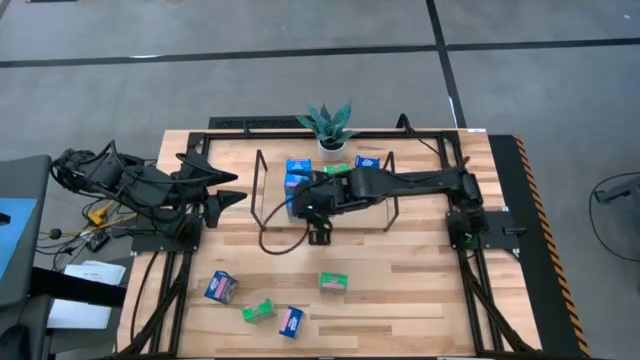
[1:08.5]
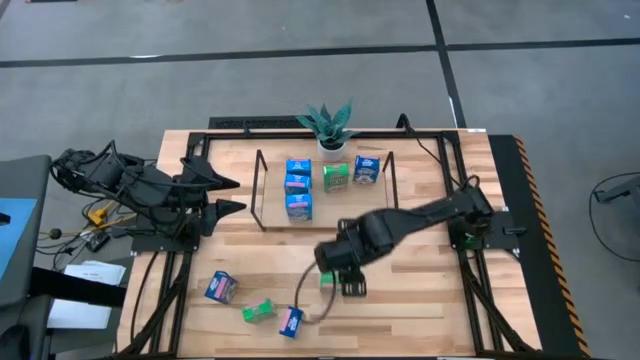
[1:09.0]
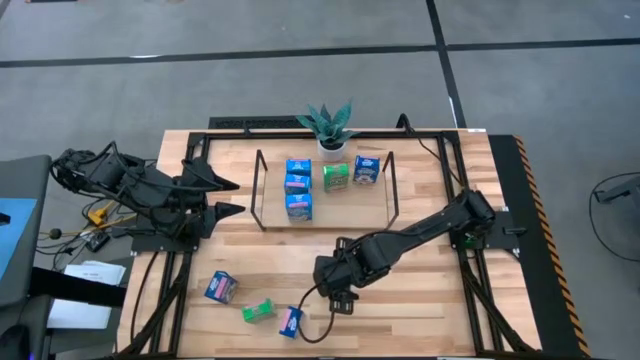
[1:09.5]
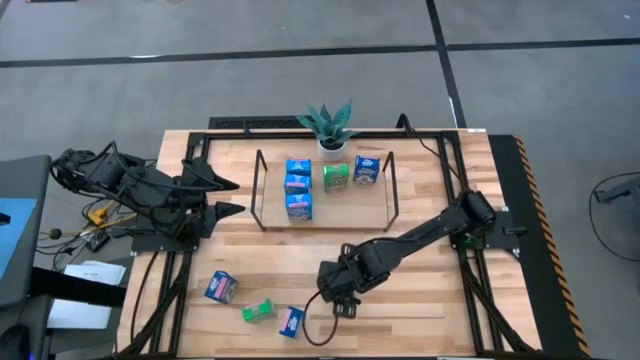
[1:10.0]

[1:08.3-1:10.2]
Task: Stack cereal on shelf
Put the right green cereal box on the shelf aligned with the other green cereal box

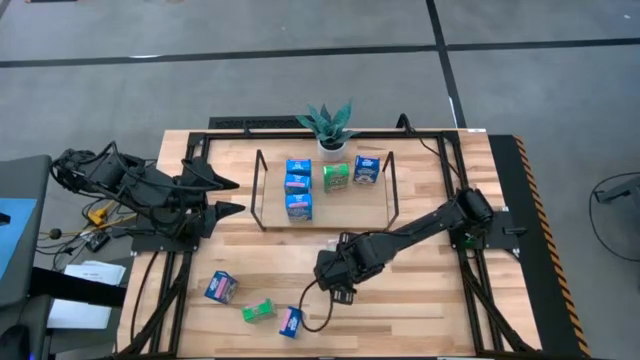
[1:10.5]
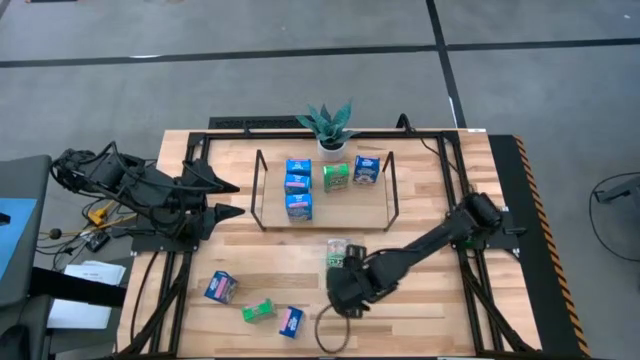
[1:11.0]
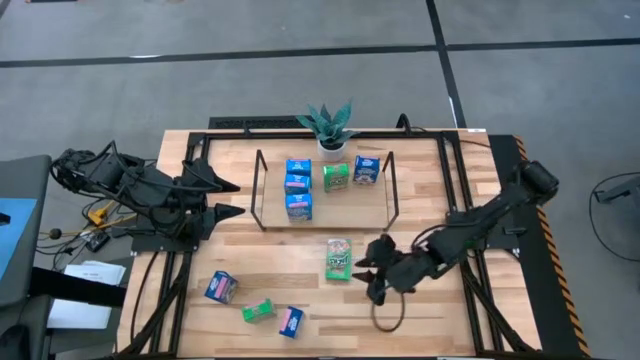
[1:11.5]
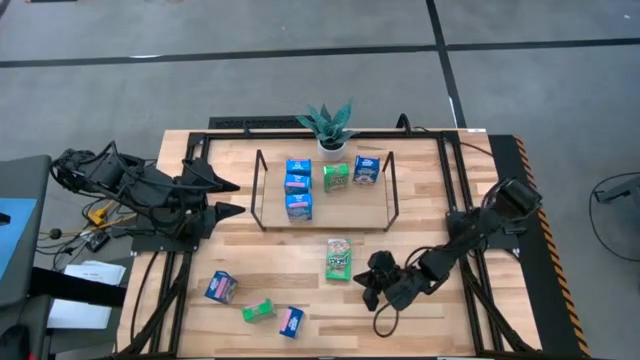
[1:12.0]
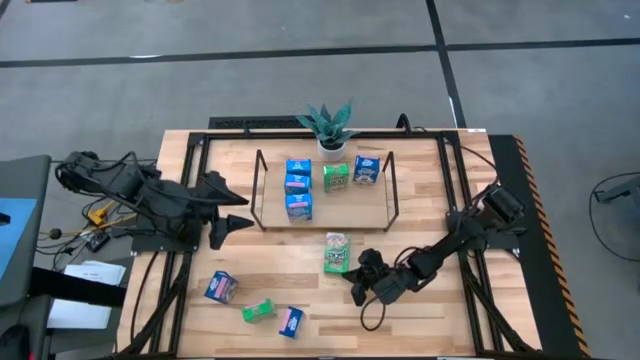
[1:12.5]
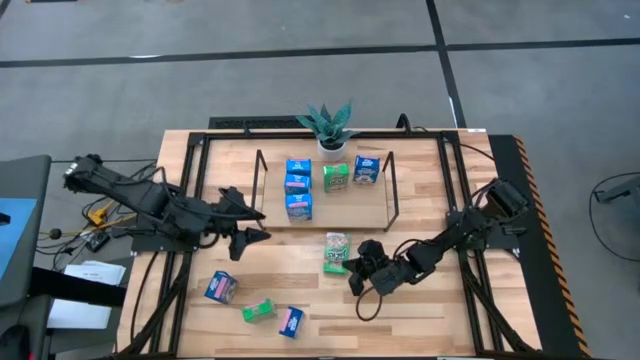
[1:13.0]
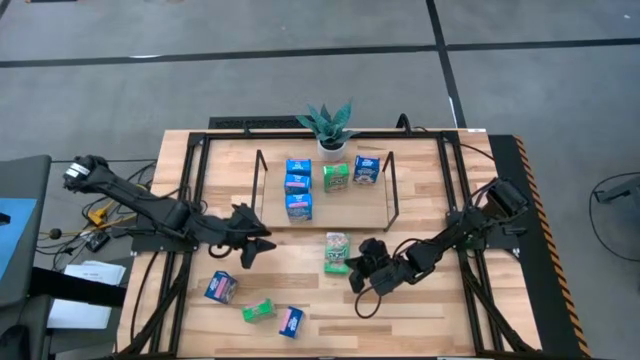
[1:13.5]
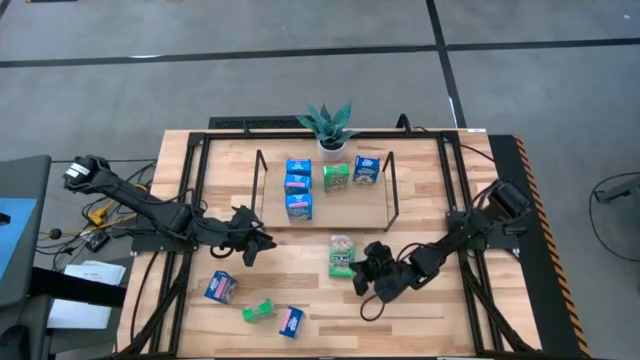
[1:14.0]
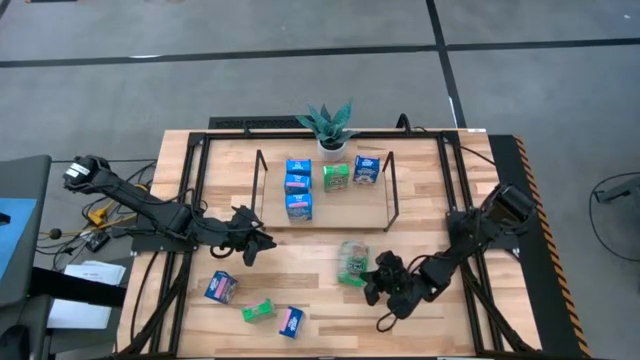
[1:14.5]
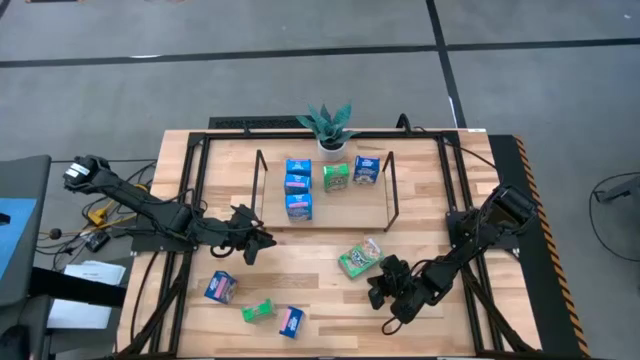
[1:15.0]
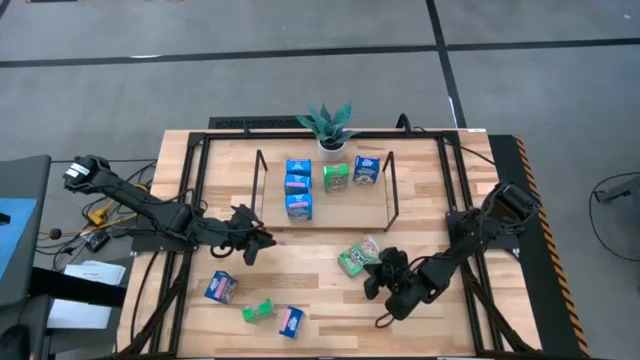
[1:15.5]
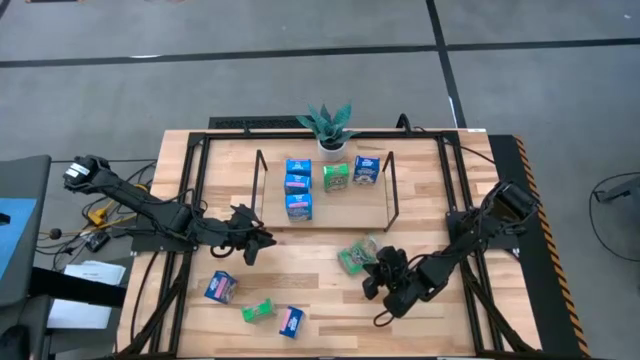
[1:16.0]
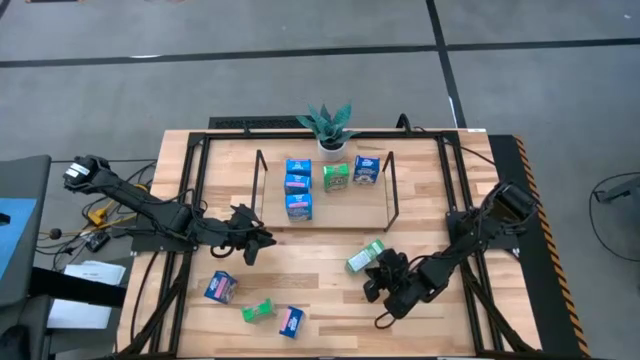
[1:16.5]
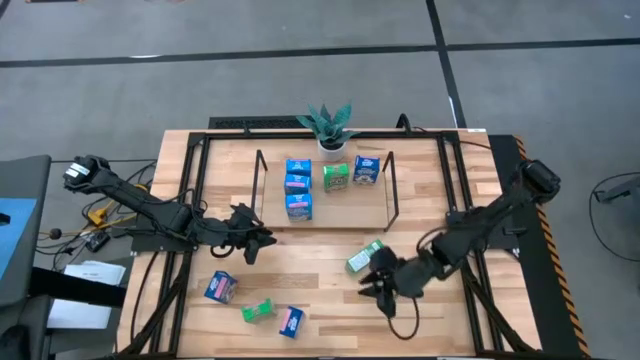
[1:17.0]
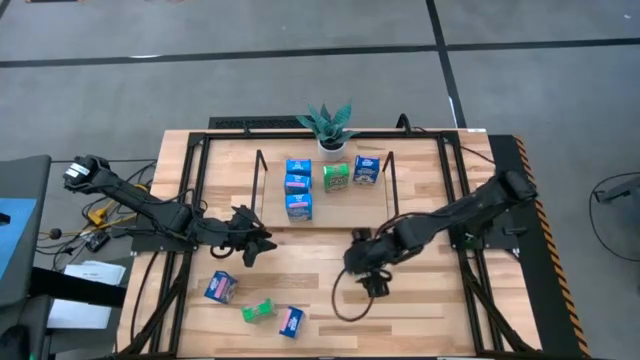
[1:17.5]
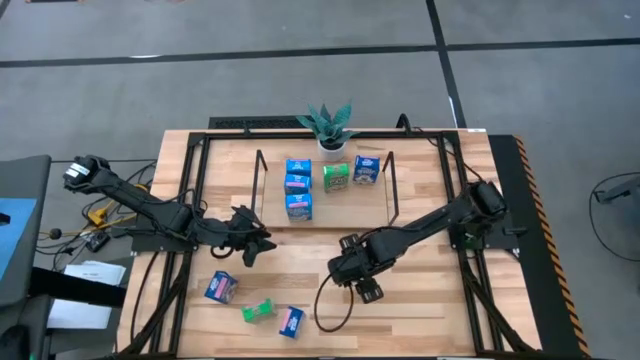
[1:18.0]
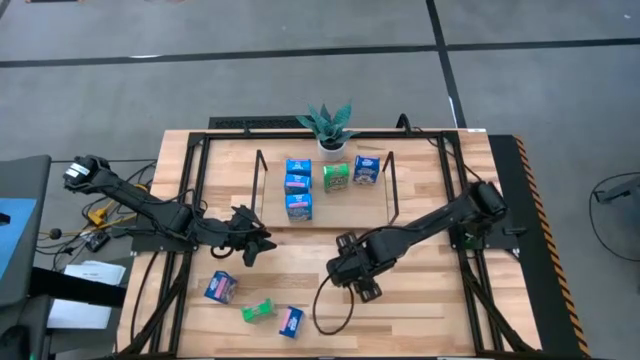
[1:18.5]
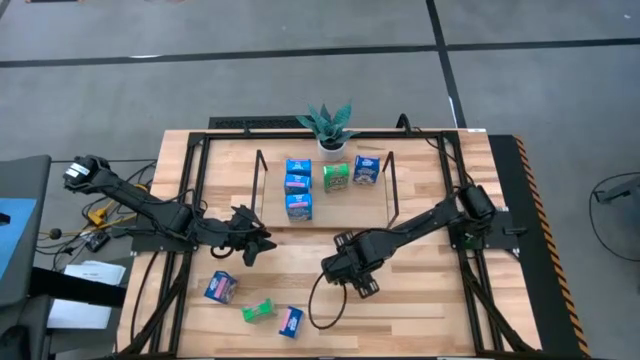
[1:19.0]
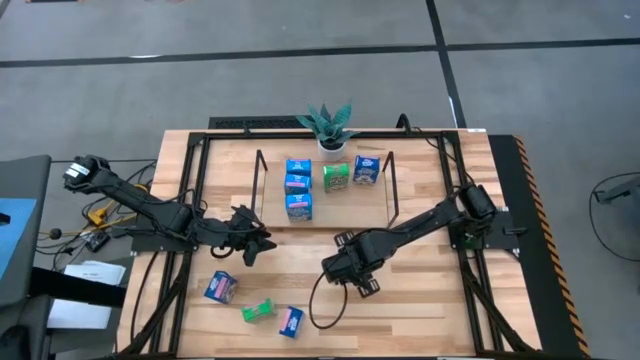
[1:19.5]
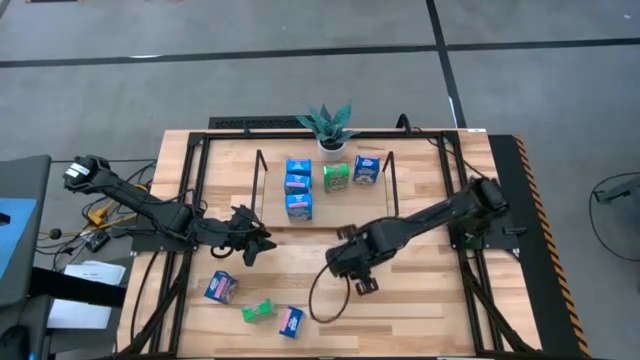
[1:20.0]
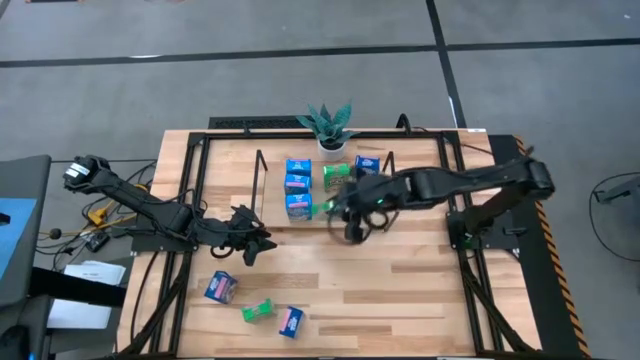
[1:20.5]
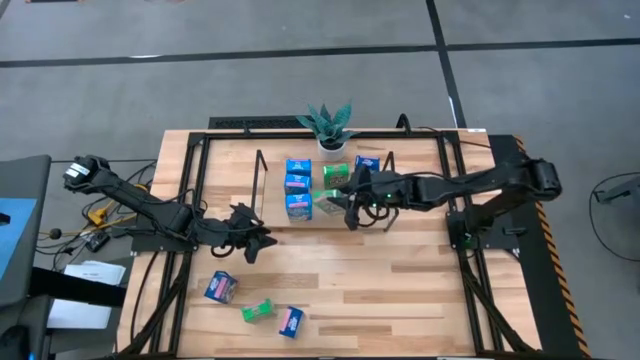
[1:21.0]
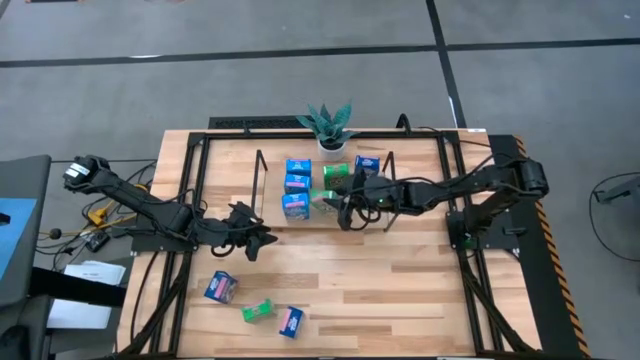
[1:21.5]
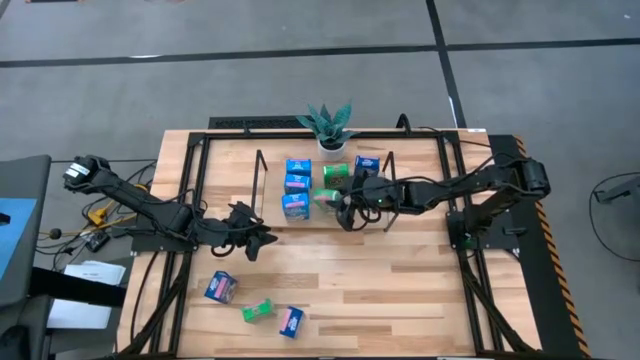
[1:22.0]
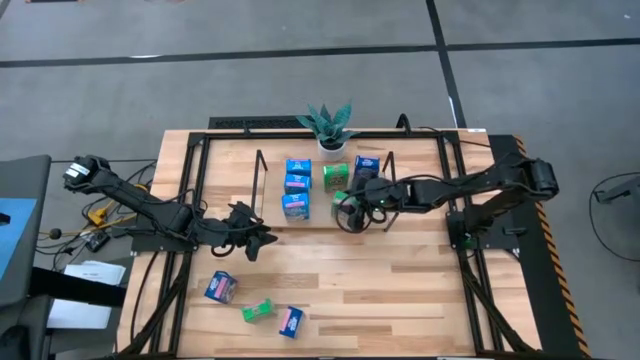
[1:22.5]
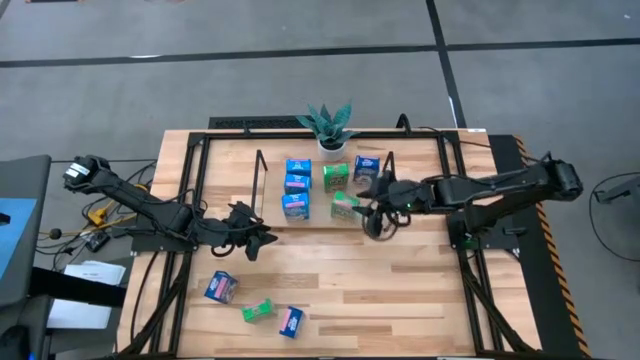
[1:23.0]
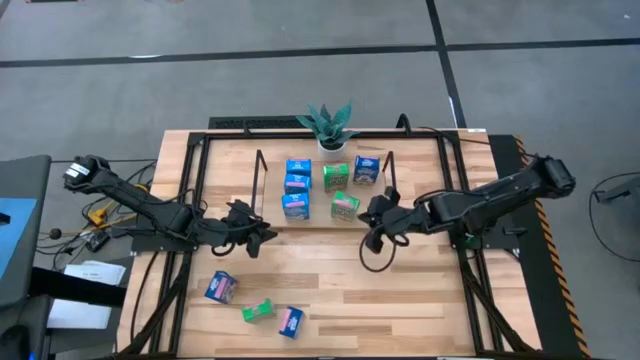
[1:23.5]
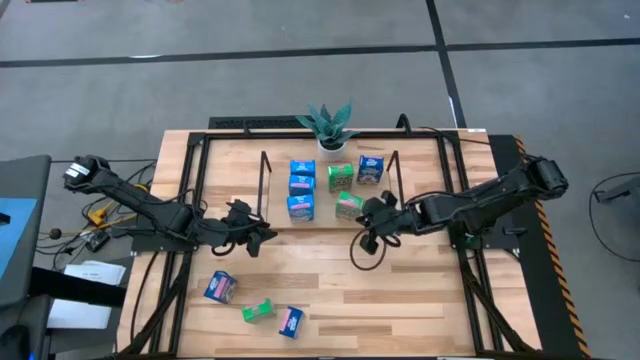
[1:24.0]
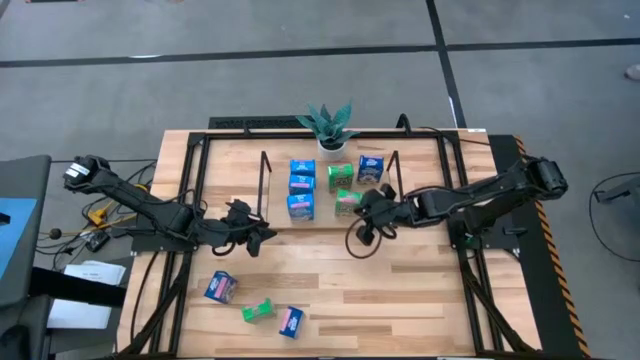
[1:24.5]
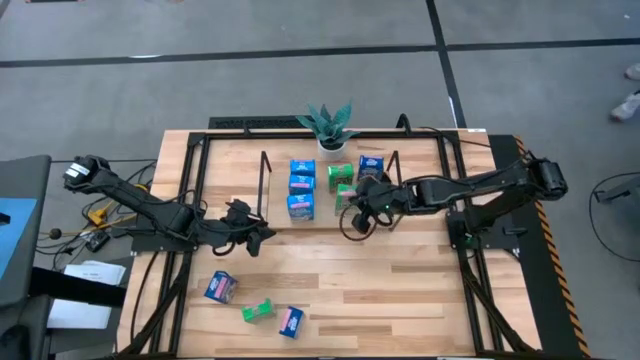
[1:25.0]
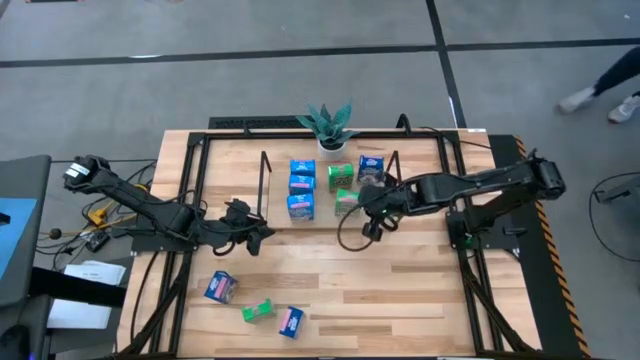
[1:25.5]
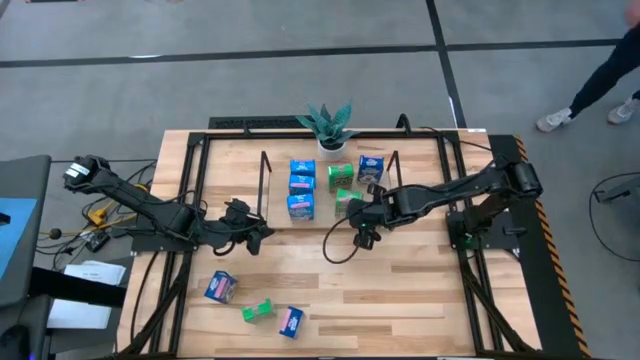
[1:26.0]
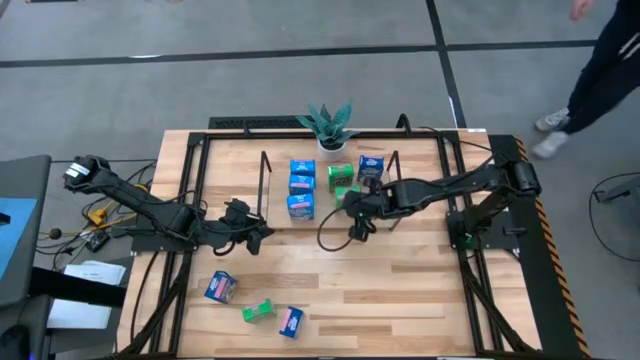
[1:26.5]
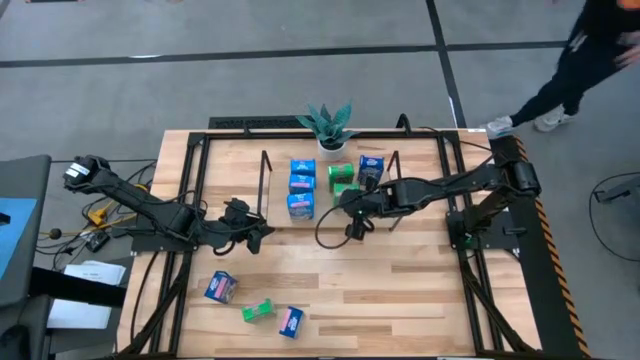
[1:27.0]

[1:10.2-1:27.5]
Put the right green cereal box on the shelf aligned with the other green cereal box
